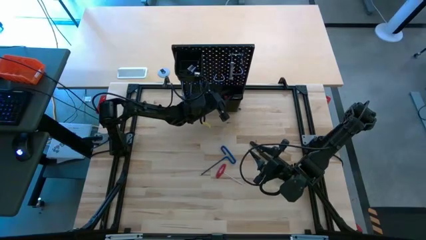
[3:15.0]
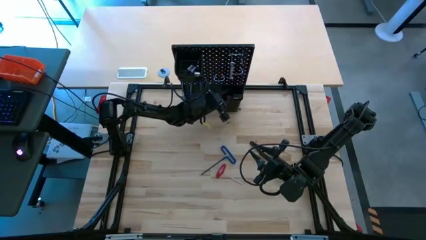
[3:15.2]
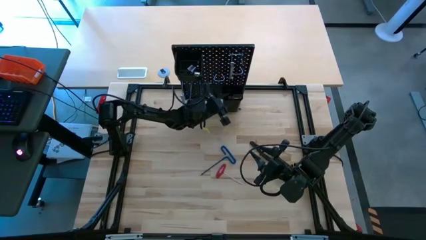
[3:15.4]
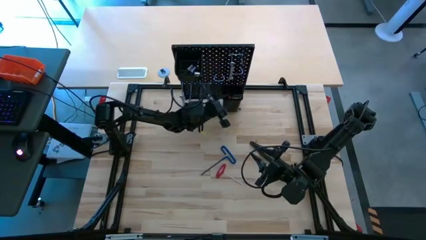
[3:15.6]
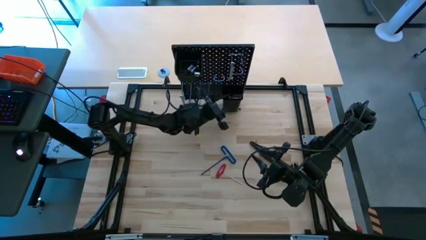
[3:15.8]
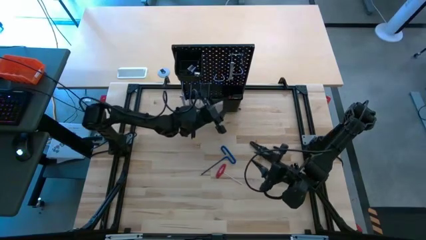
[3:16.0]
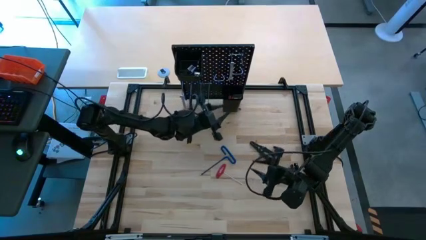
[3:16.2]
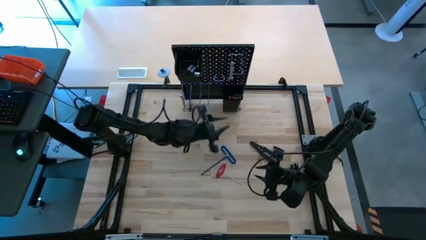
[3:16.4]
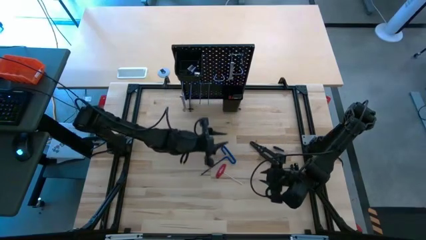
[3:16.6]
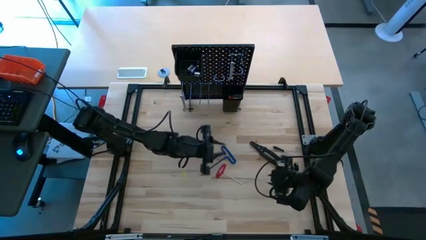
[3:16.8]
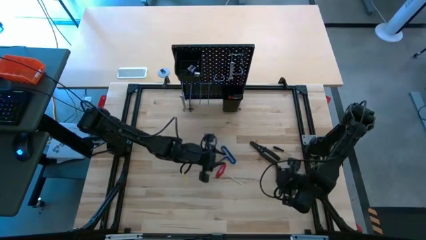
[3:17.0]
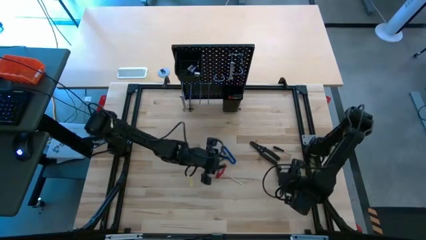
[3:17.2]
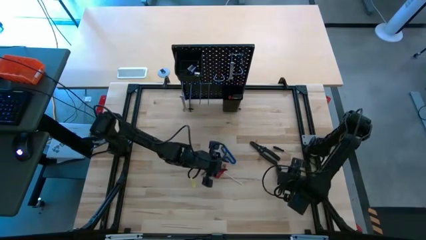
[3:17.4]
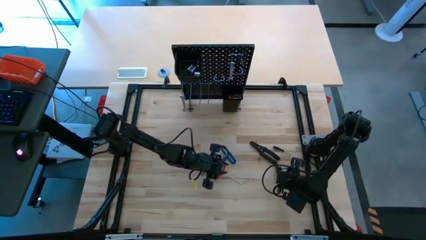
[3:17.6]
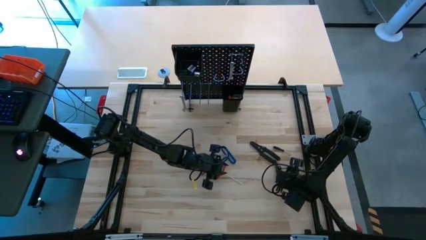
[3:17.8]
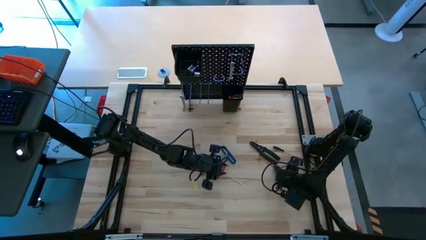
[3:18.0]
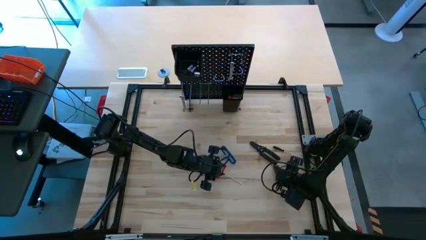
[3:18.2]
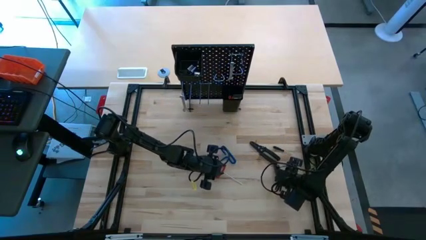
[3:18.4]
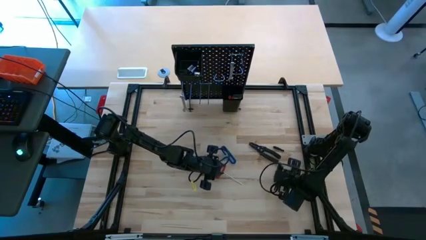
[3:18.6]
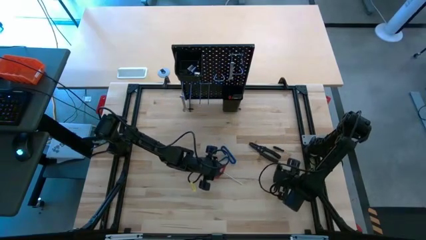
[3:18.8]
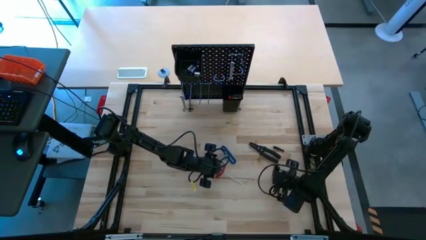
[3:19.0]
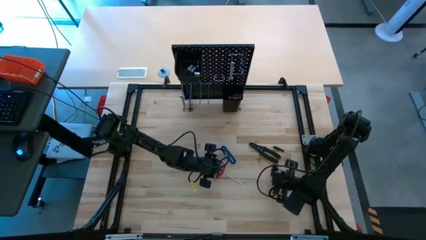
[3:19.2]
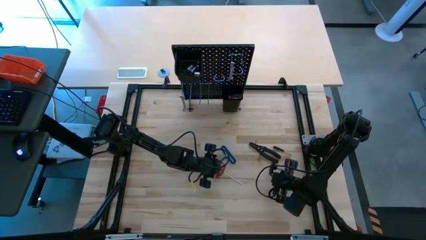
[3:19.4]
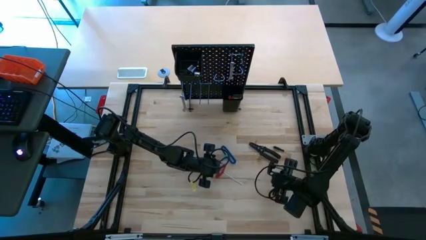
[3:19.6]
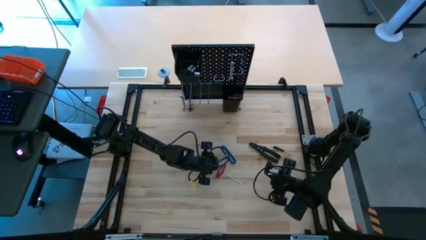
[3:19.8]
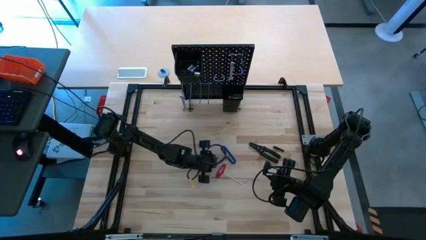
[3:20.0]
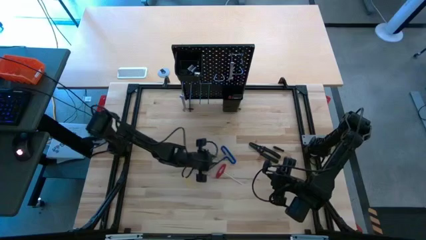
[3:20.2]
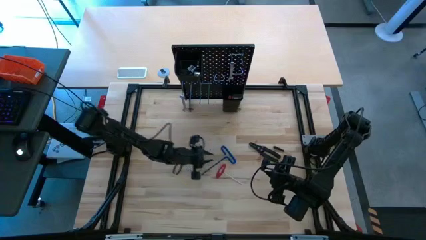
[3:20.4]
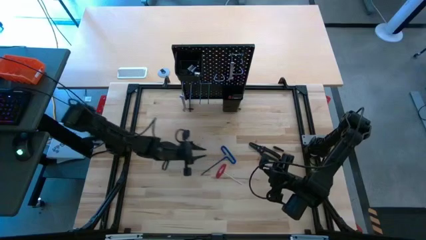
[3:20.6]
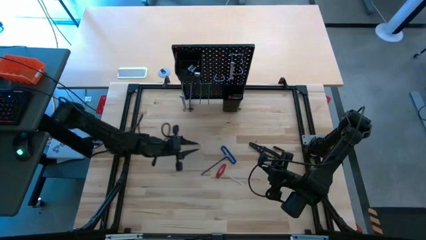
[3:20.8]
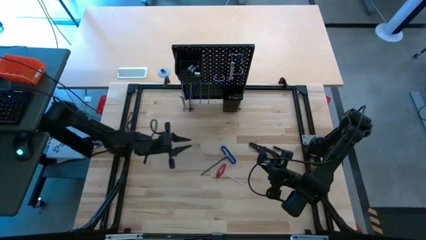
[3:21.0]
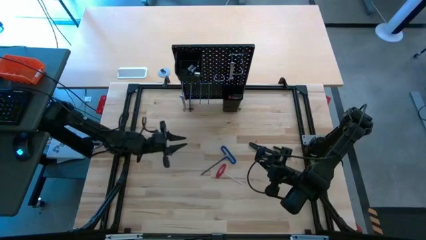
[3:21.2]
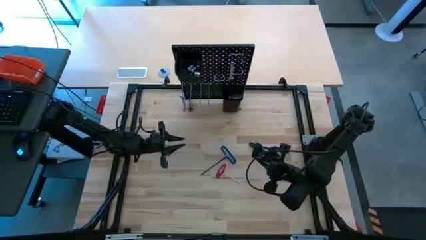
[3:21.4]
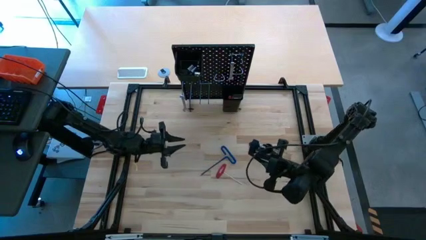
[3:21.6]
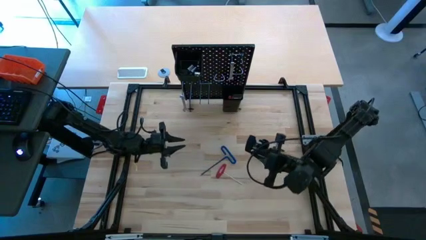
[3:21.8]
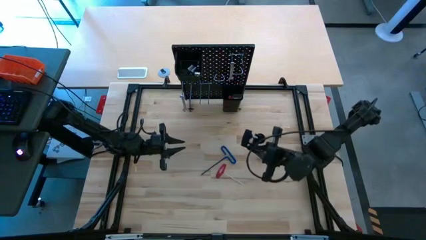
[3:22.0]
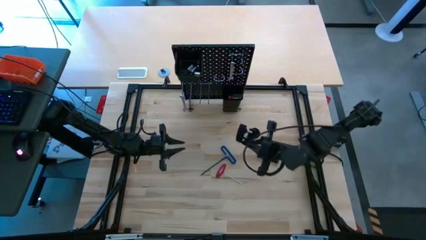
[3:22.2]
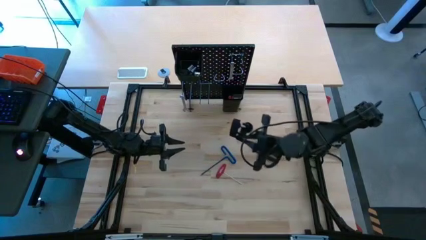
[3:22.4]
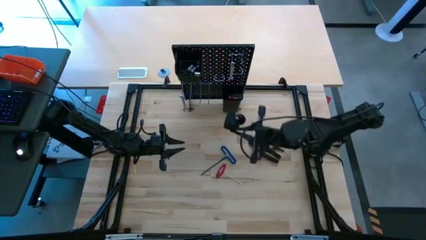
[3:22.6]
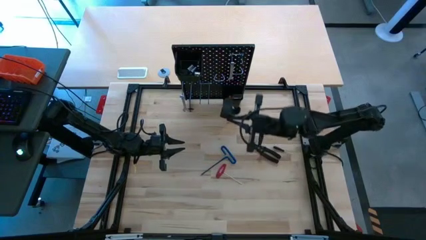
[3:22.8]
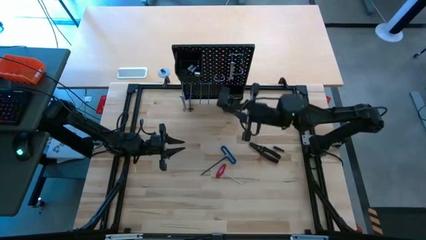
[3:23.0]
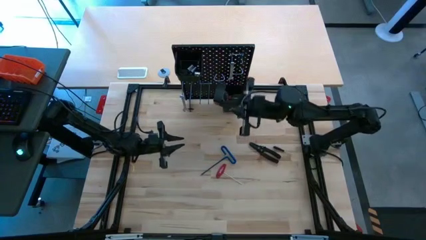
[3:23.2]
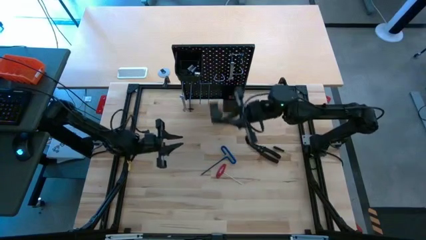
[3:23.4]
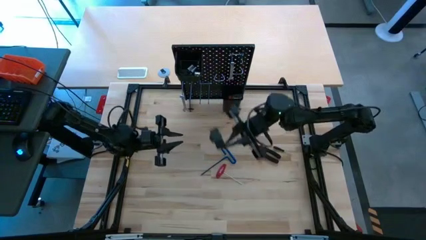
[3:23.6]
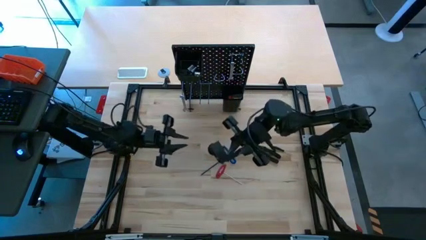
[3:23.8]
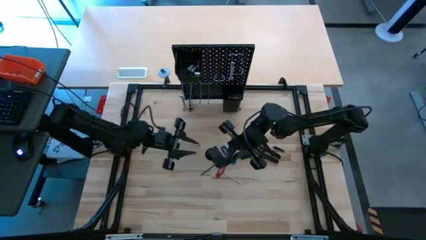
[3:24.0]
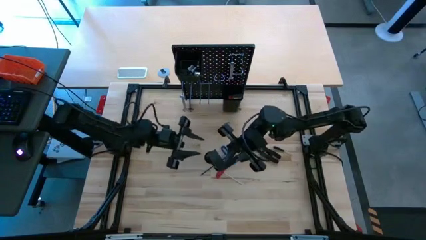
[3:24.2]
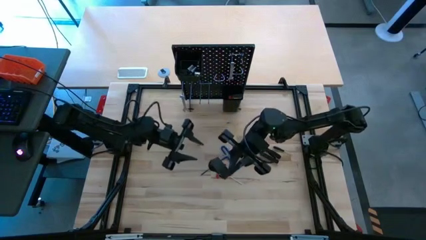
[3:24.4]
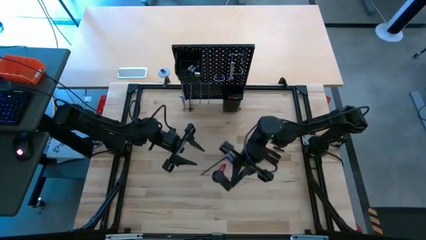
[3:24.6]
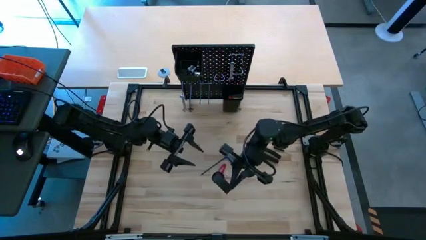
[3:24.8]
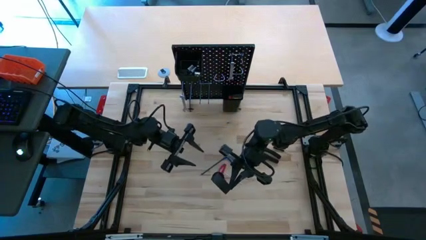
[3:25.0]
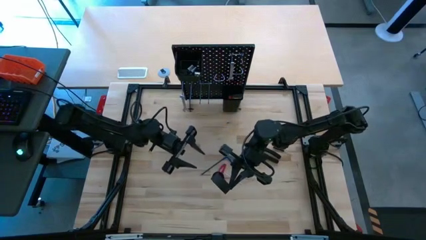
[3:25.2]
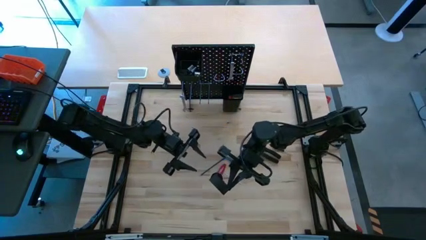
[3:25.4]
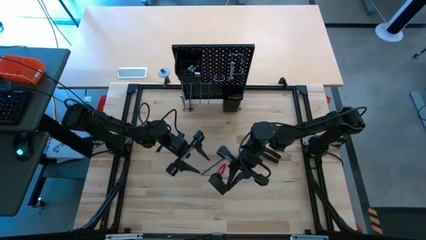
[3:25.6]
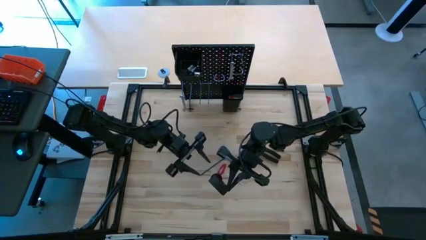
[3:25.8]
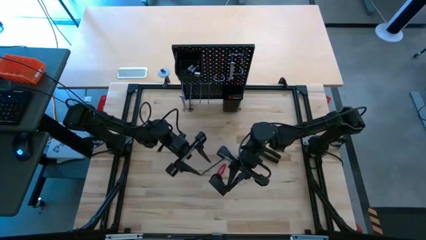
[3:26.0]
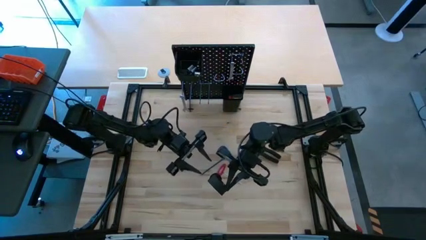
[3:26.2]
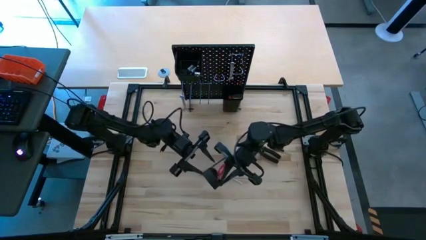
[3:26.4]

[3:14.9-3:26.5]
Task: Hang tools onto peg board
Hang the clamp on the pegboard
